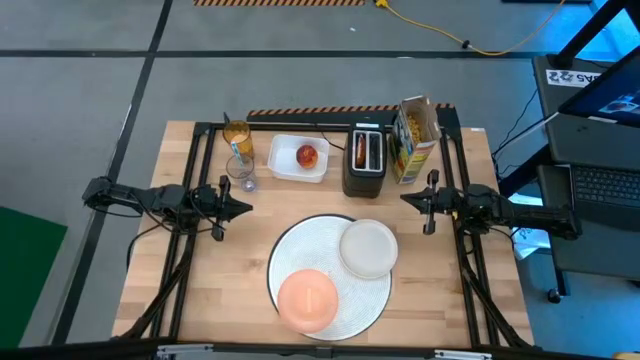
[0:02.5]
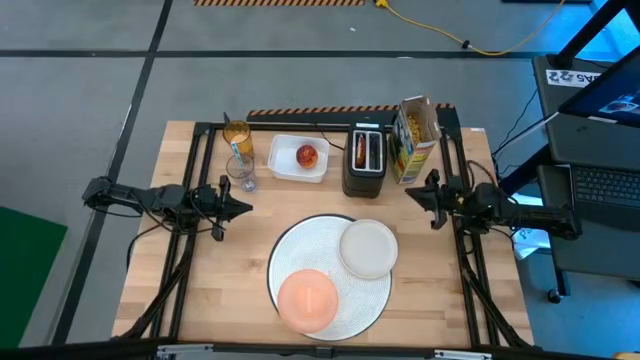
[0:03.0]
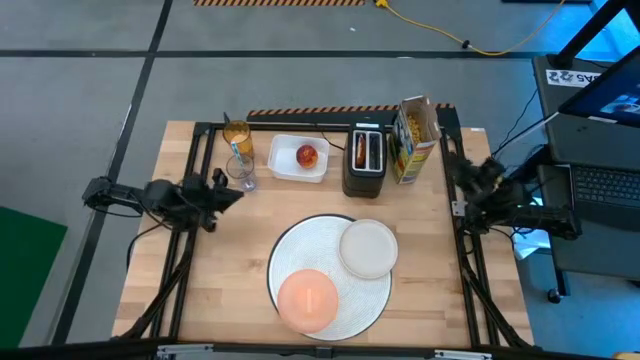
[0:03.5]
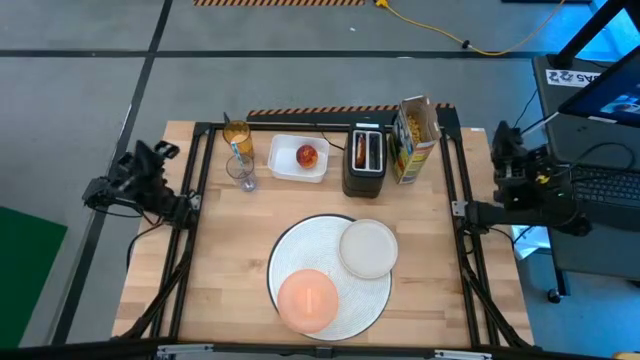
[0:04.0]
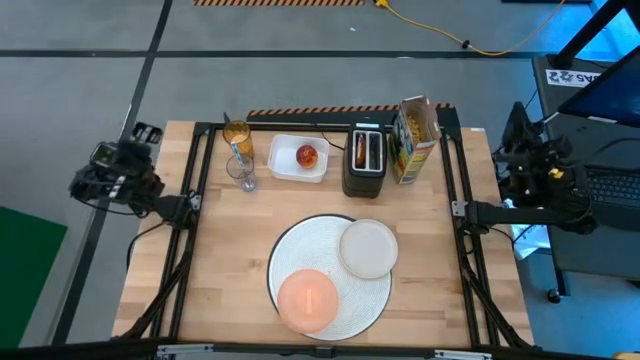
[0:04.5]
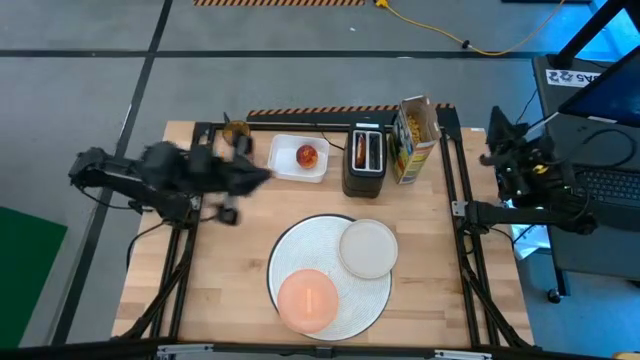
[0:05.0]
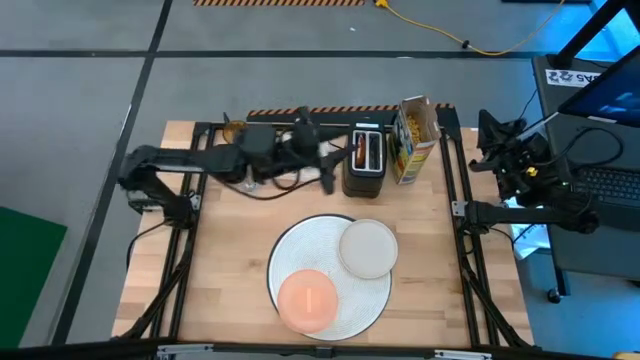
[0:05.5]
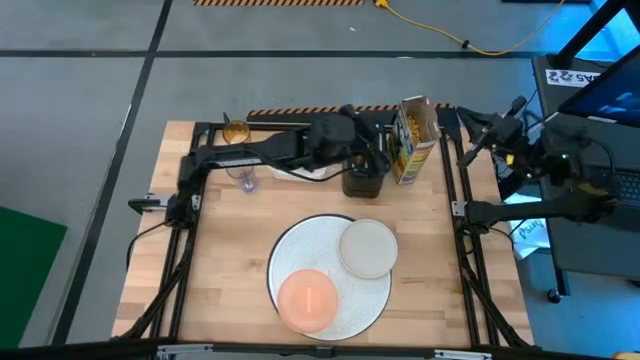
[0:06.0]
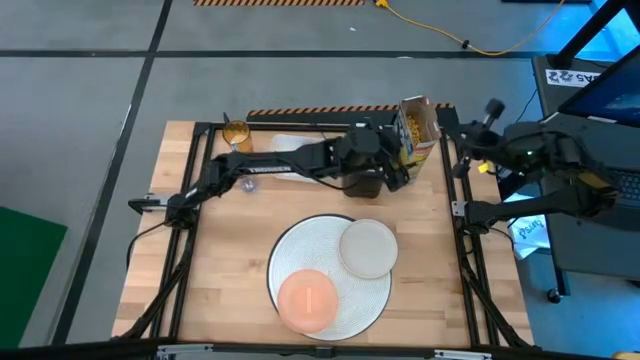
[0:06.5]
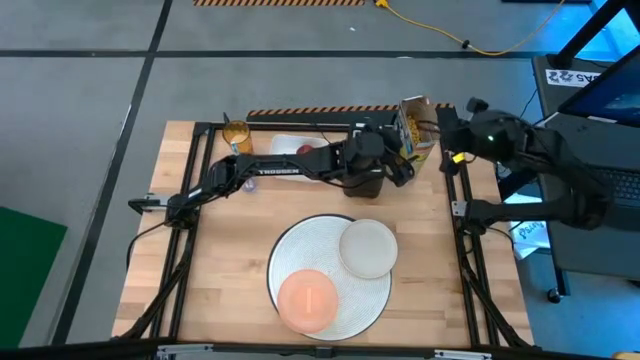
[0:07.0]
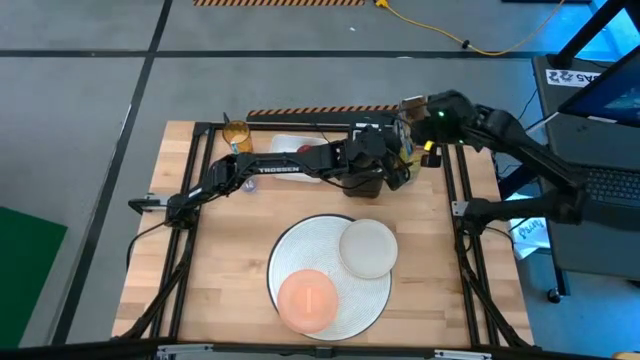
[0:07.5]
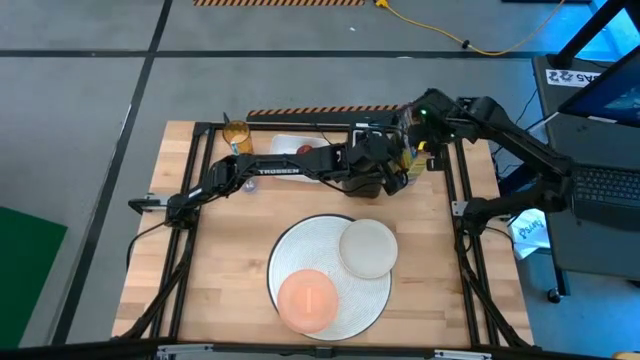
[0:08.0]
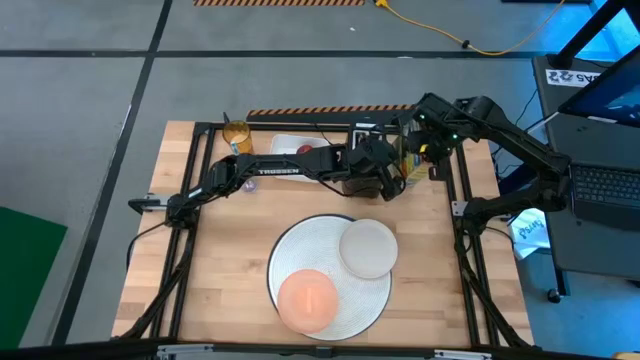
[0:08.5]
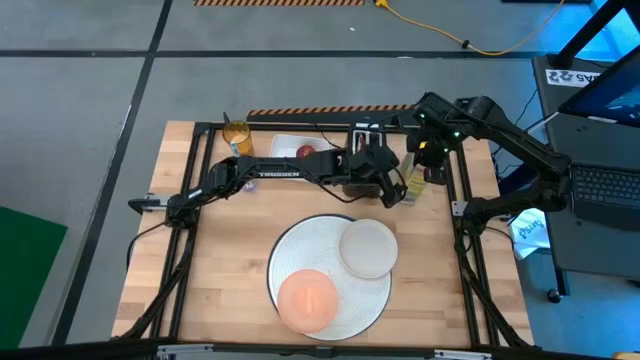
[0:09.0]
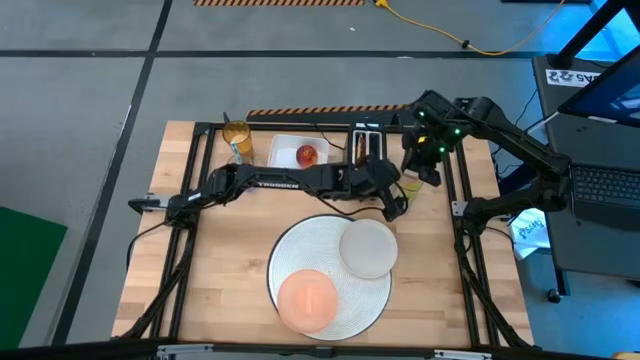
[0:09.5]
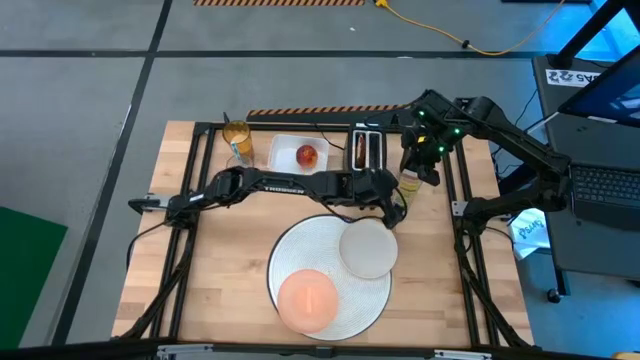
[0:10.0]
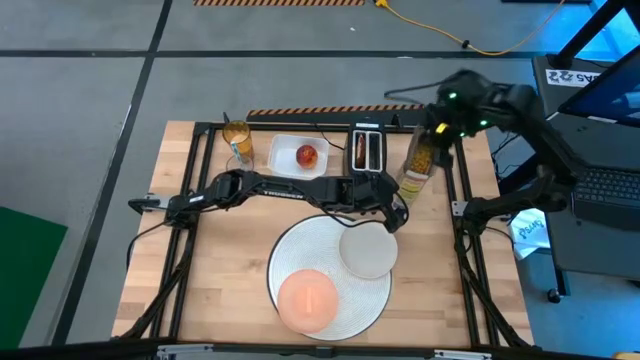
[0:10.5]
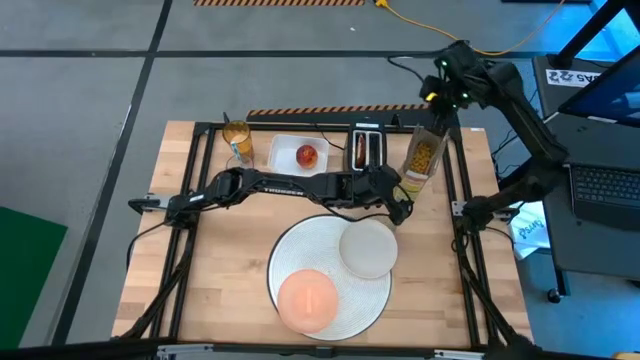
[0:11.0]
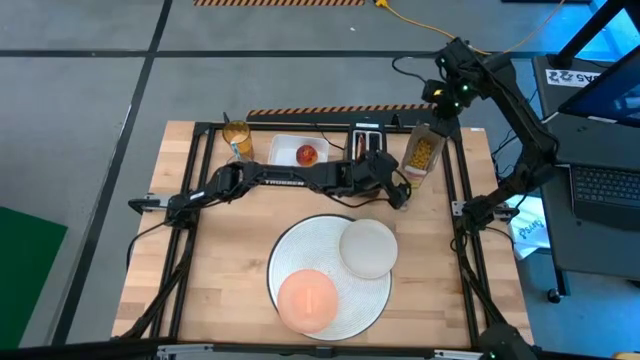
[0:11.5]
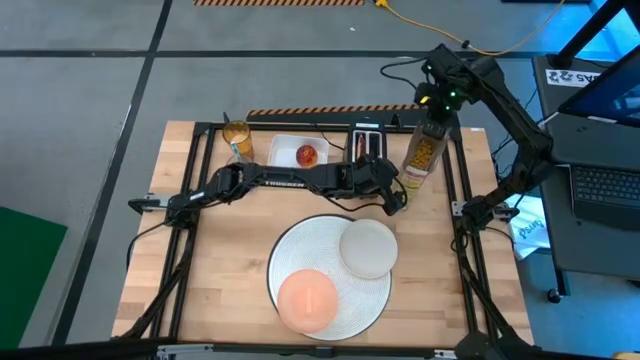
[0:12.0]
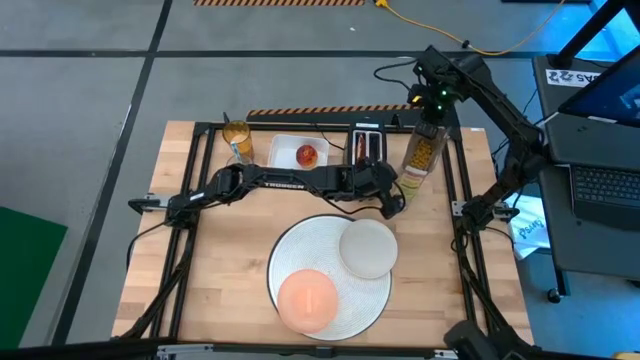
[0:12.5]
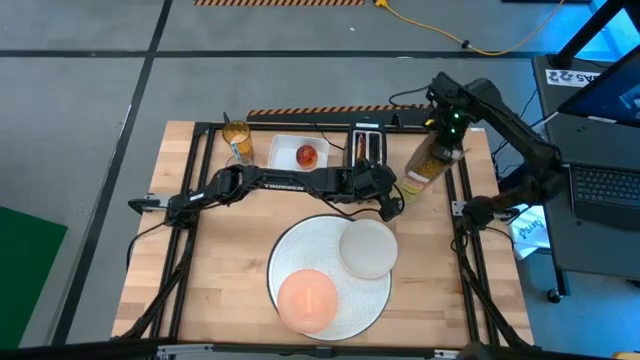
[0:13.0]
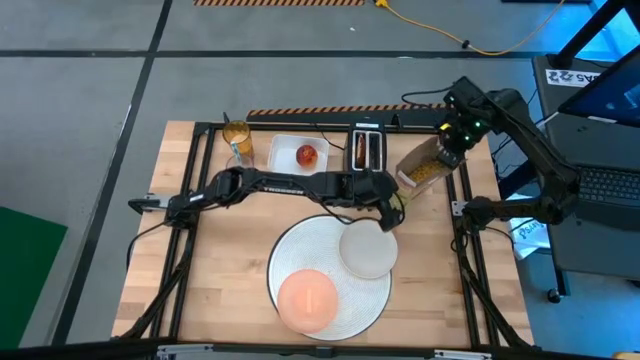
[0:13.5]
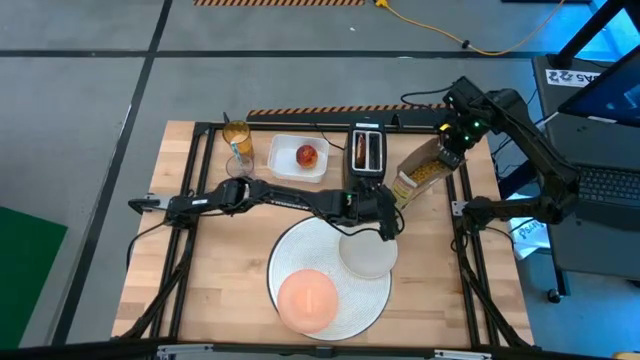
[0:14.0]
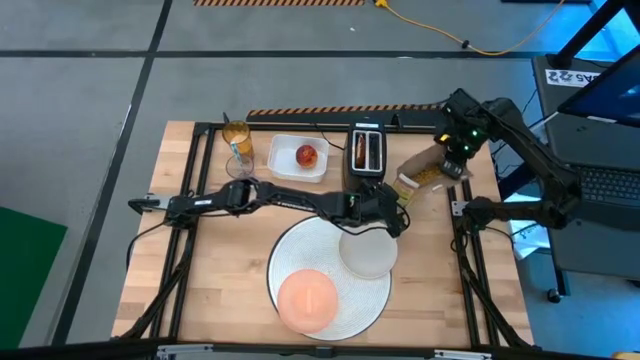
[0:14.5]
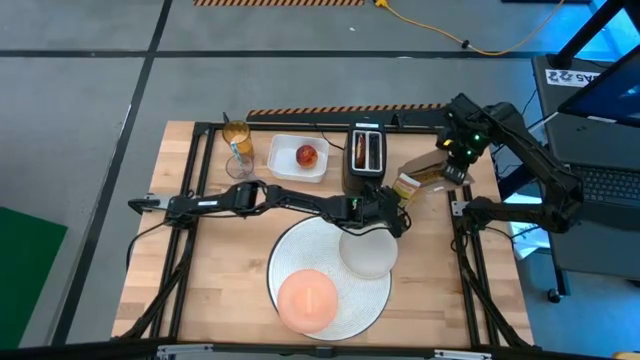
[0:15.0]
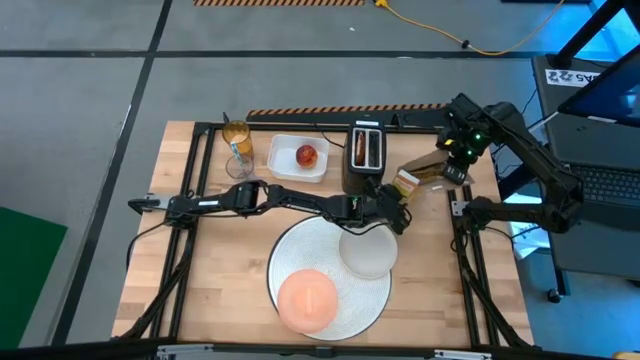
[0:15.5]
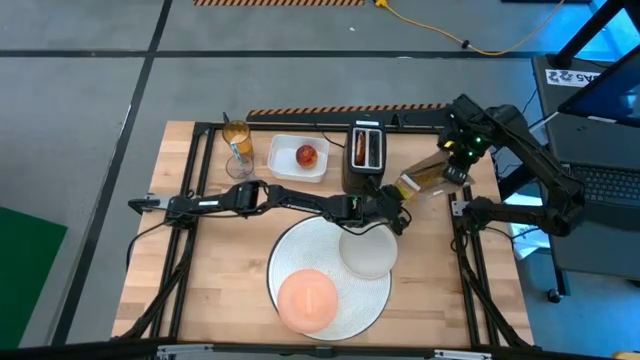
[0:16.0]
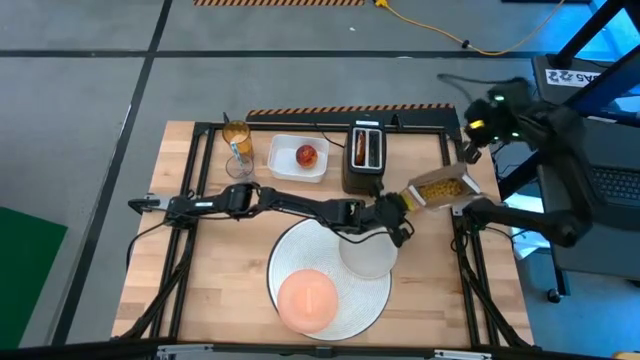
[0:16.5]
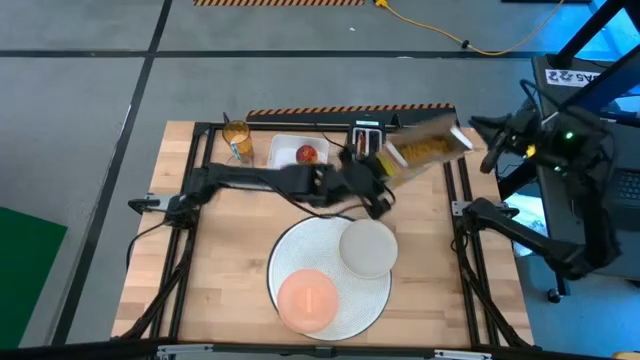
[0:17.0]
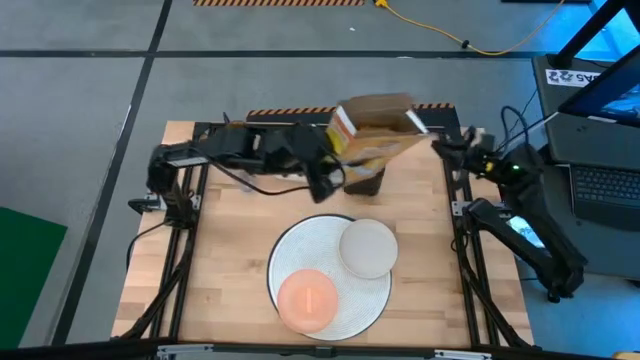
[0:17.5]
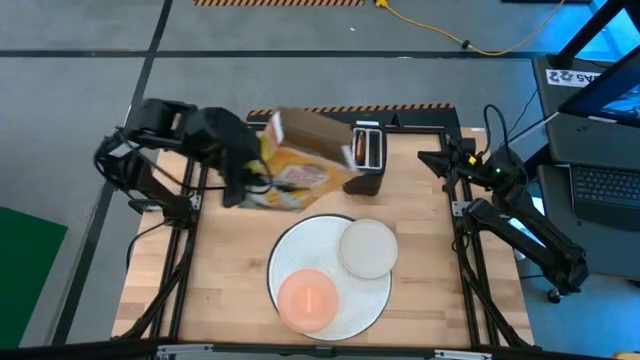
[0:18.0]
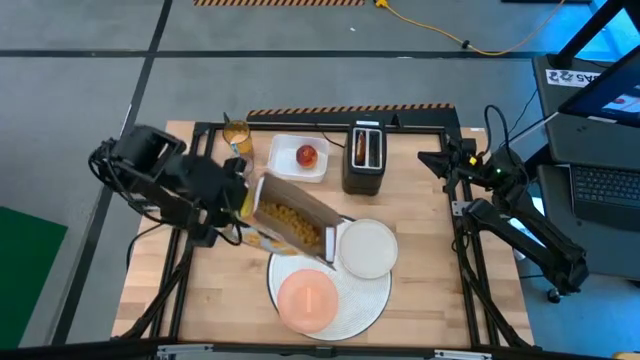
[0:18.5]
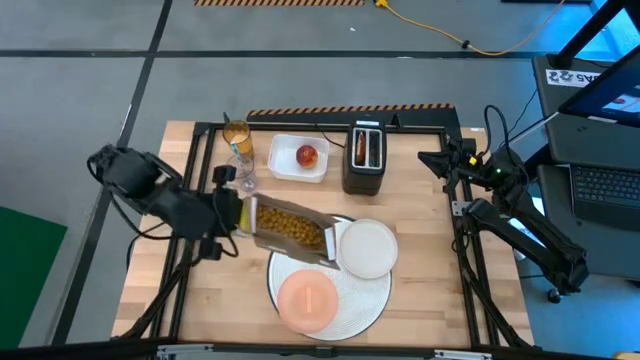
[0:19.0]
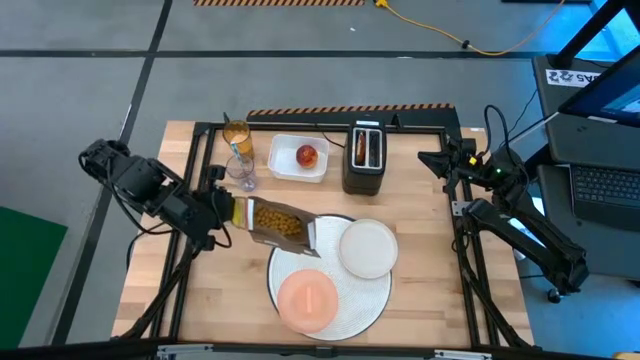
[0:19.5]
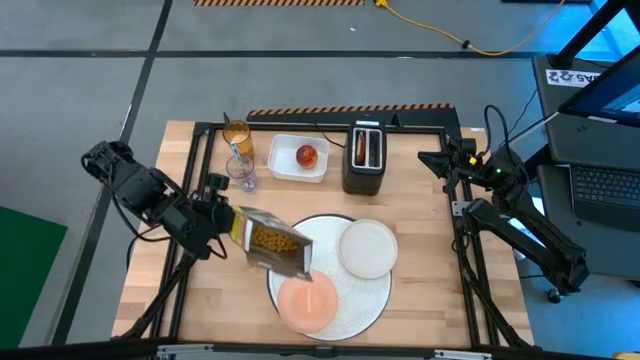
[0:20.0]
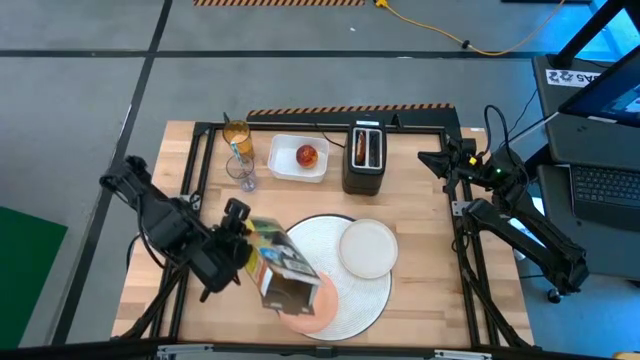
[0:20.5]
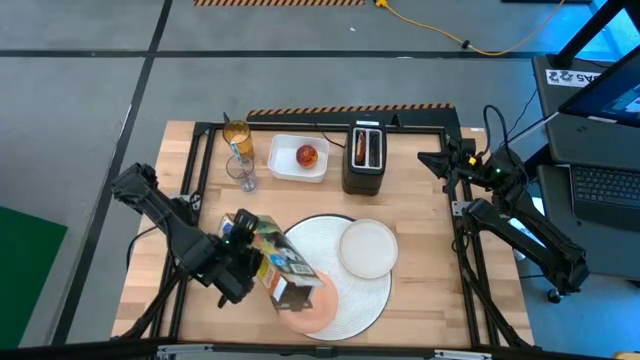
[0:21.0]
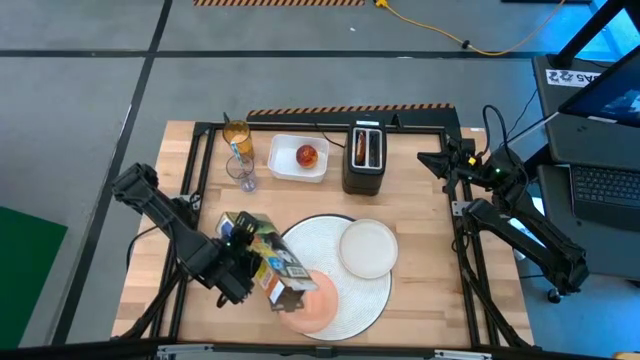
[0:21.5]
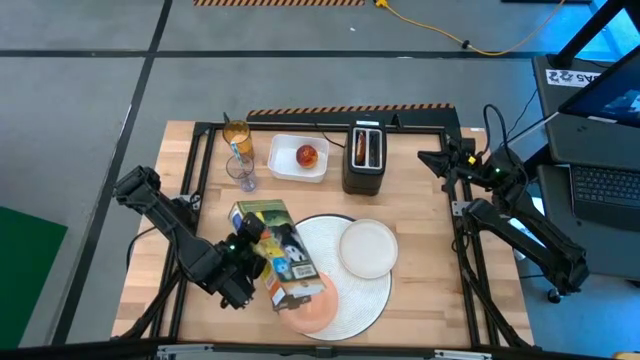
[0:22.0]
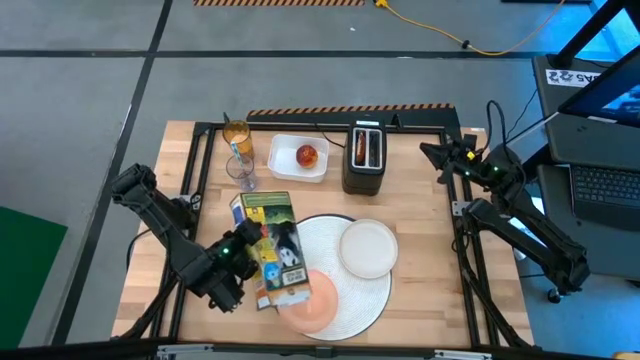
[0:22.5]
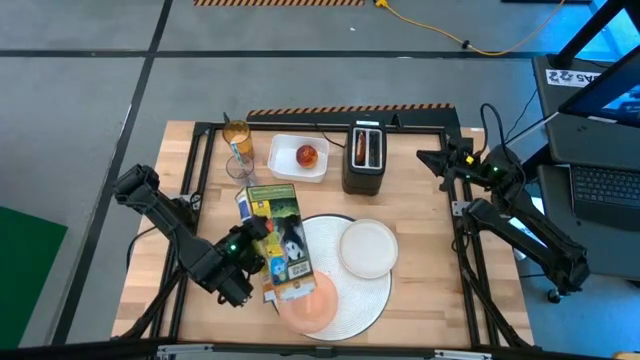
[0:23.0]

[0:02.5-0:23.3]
Task: Arrange a breakfast setting
Pour the cereal from the cereal box into the pink bowl
